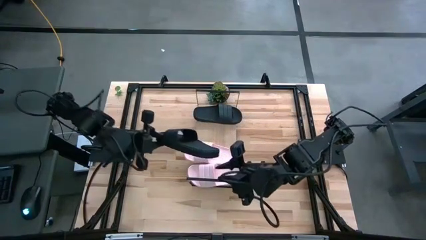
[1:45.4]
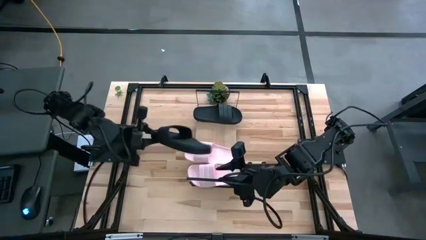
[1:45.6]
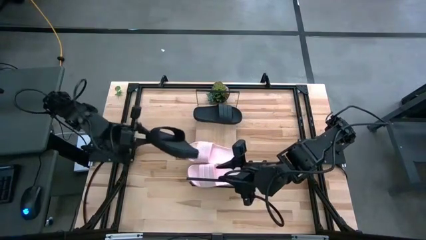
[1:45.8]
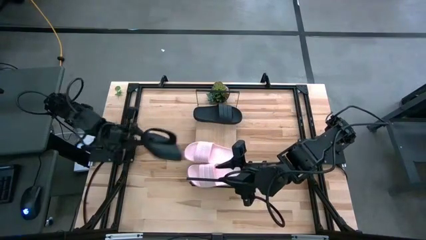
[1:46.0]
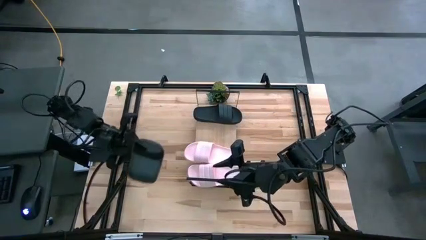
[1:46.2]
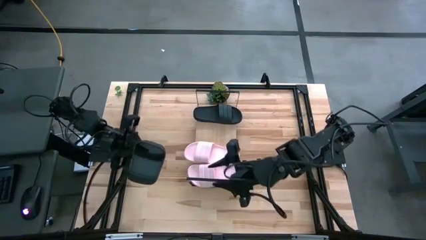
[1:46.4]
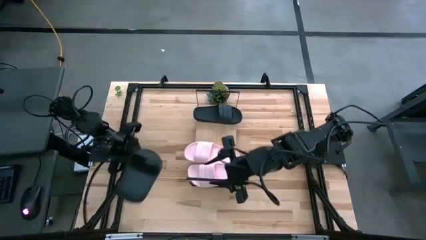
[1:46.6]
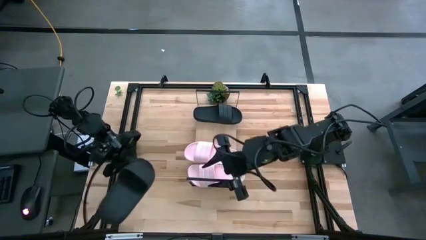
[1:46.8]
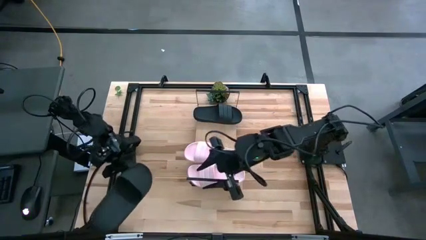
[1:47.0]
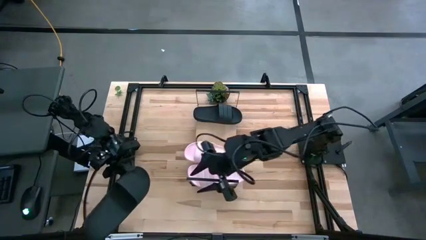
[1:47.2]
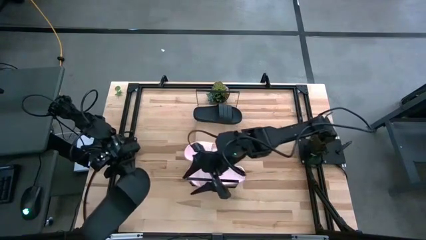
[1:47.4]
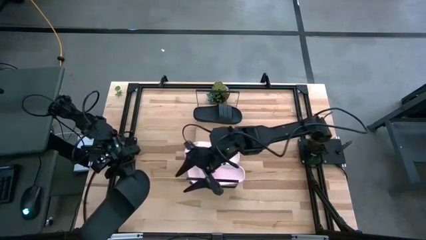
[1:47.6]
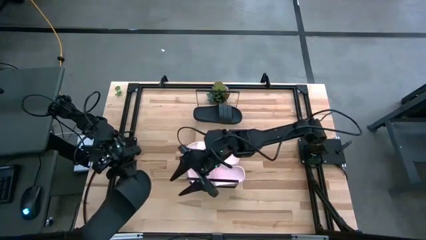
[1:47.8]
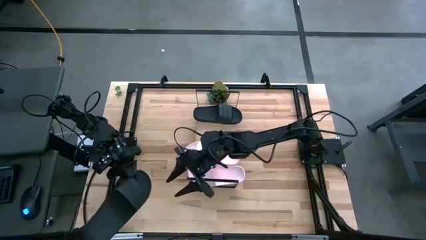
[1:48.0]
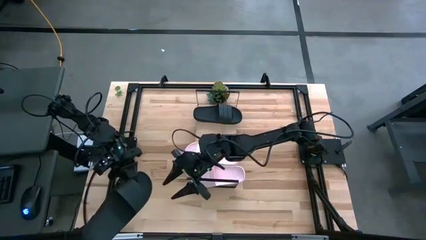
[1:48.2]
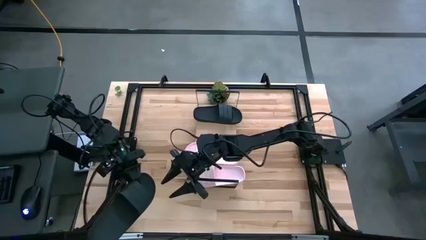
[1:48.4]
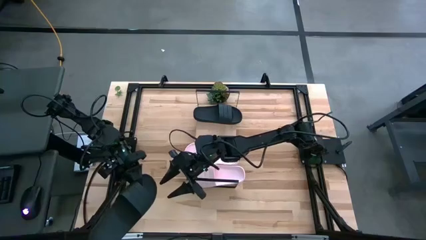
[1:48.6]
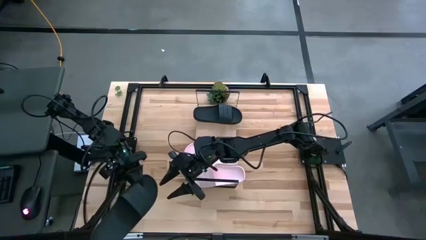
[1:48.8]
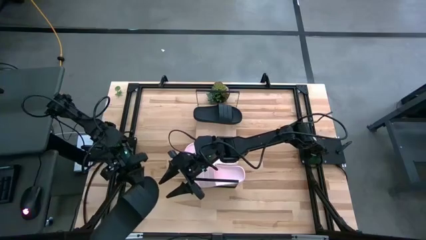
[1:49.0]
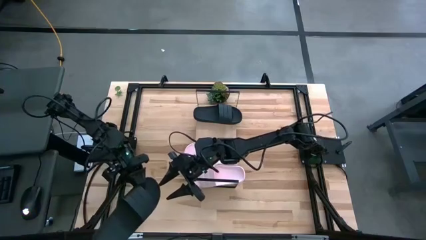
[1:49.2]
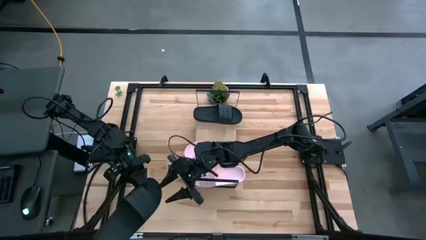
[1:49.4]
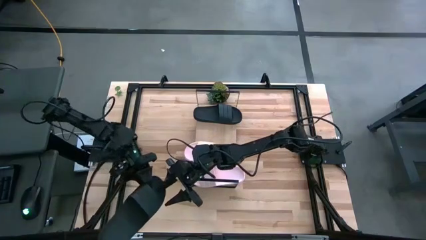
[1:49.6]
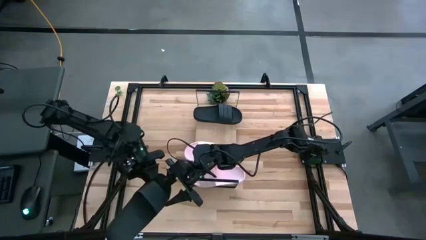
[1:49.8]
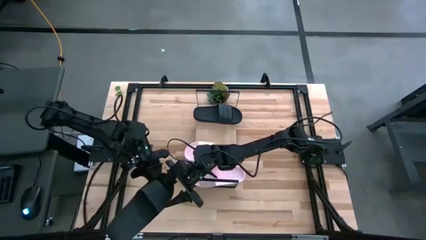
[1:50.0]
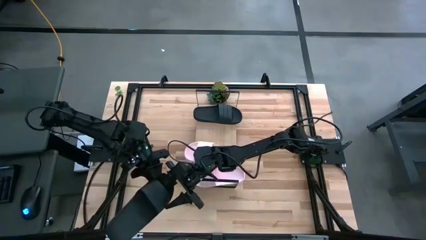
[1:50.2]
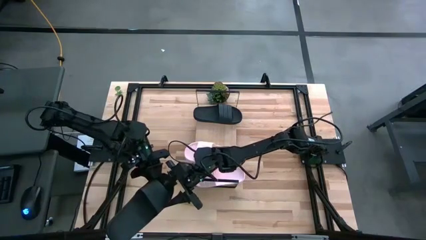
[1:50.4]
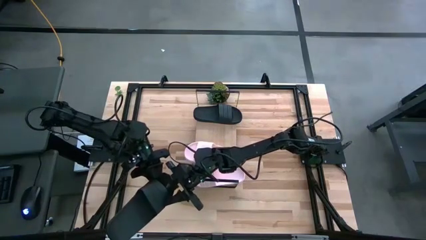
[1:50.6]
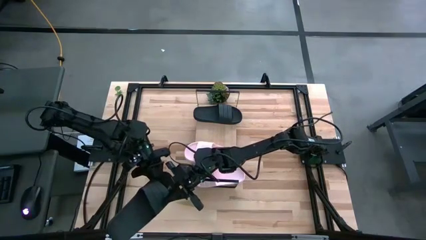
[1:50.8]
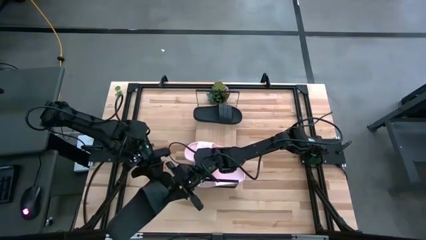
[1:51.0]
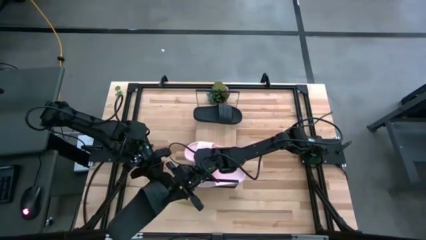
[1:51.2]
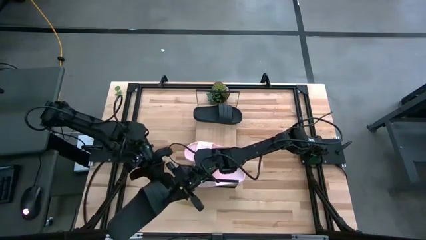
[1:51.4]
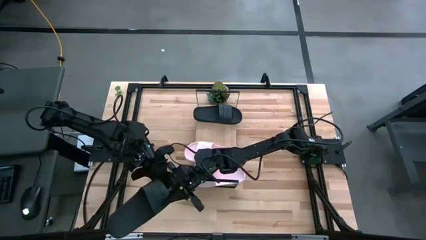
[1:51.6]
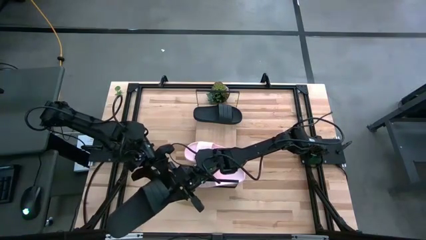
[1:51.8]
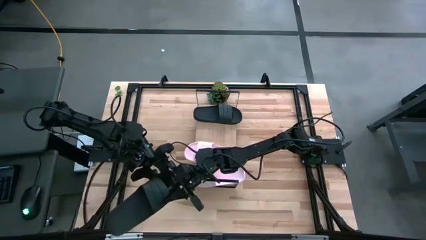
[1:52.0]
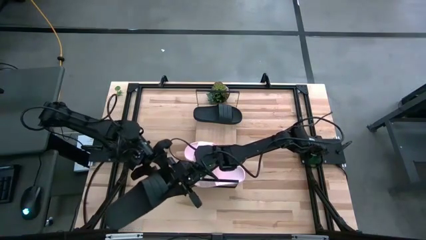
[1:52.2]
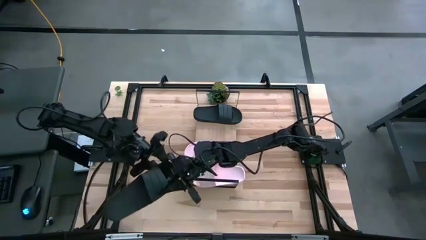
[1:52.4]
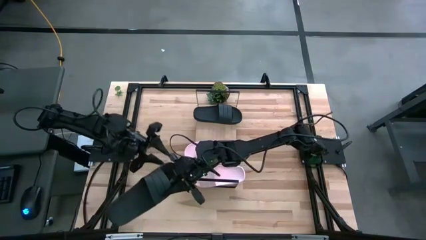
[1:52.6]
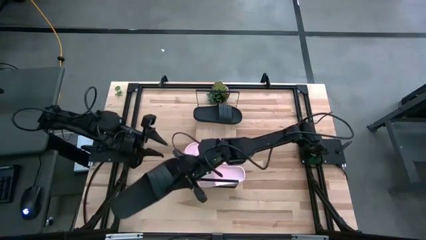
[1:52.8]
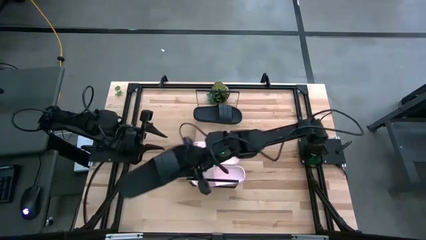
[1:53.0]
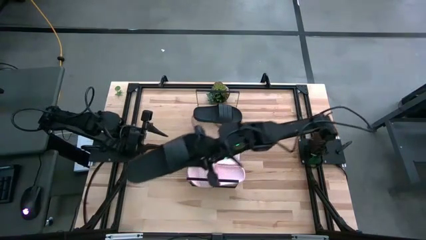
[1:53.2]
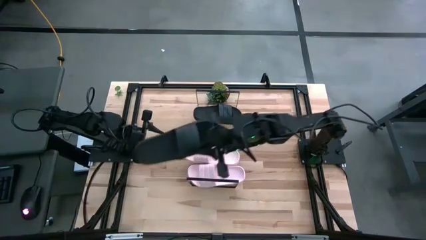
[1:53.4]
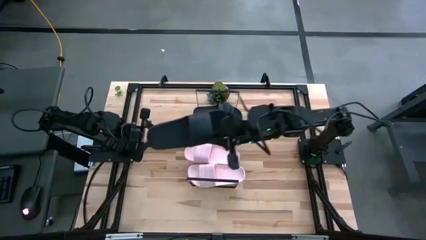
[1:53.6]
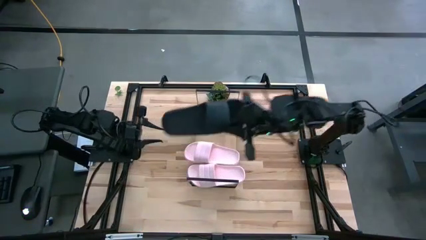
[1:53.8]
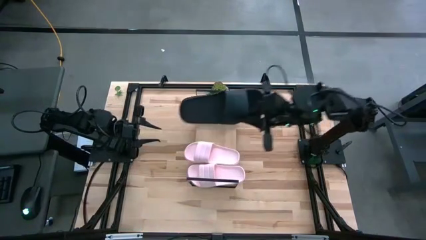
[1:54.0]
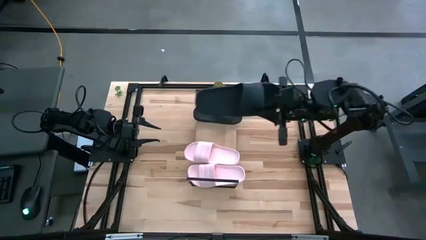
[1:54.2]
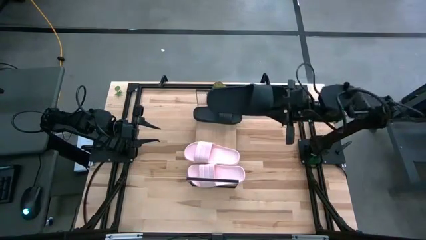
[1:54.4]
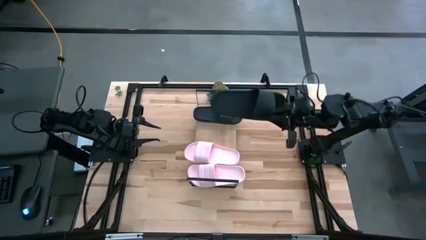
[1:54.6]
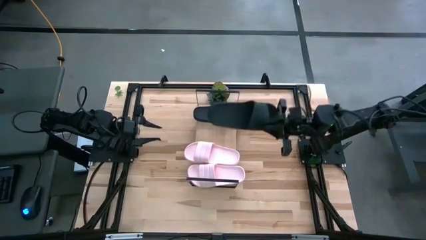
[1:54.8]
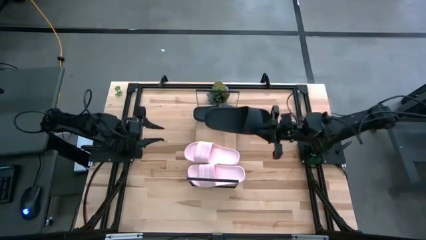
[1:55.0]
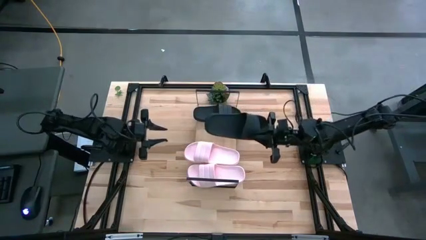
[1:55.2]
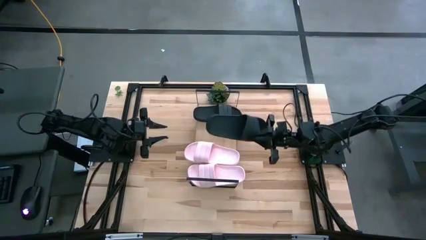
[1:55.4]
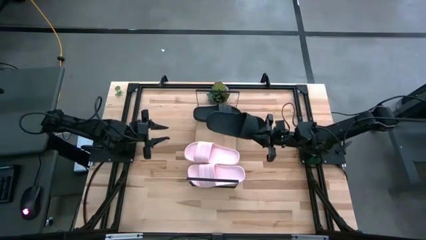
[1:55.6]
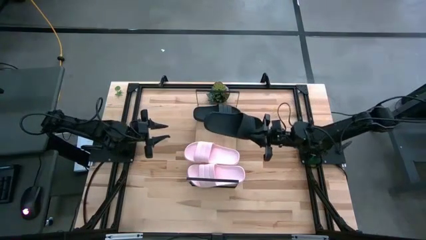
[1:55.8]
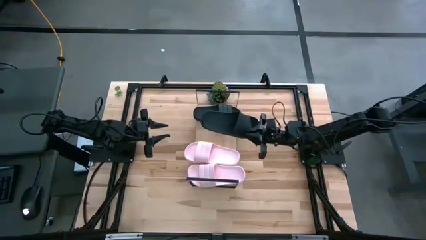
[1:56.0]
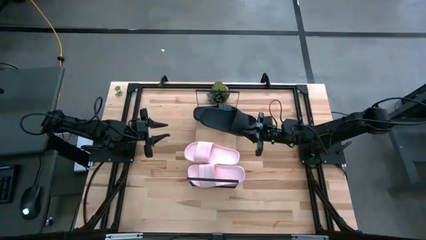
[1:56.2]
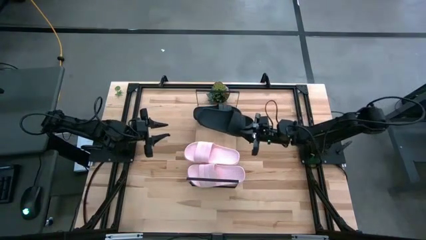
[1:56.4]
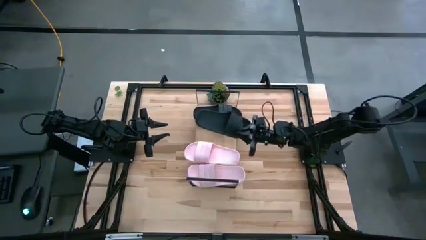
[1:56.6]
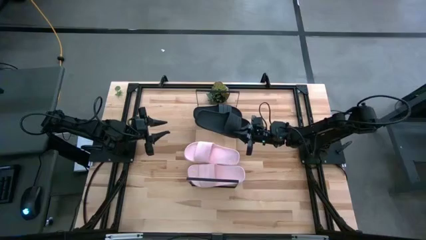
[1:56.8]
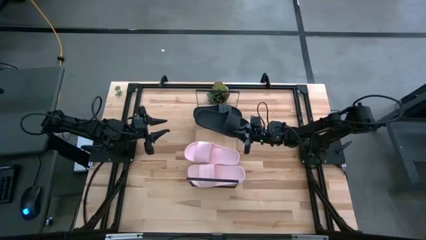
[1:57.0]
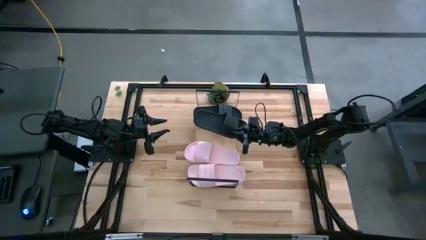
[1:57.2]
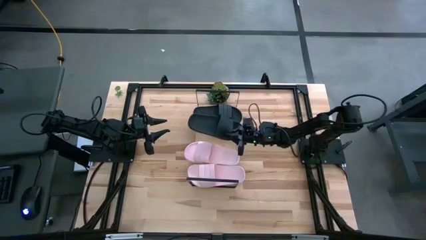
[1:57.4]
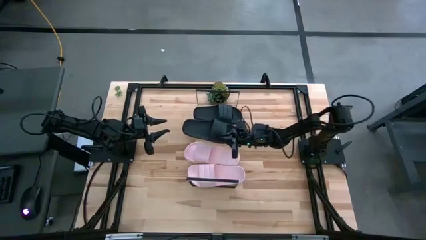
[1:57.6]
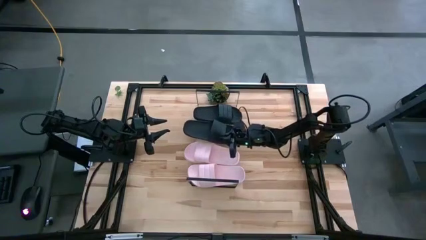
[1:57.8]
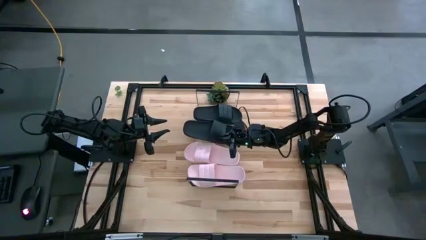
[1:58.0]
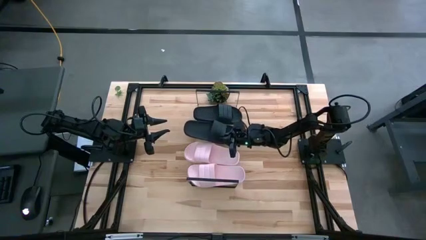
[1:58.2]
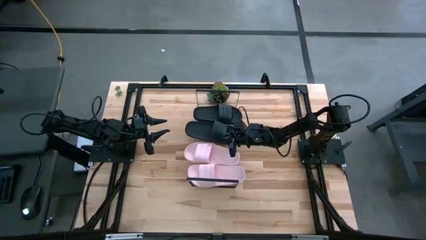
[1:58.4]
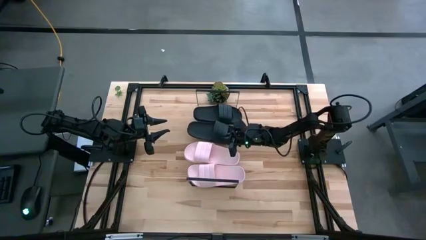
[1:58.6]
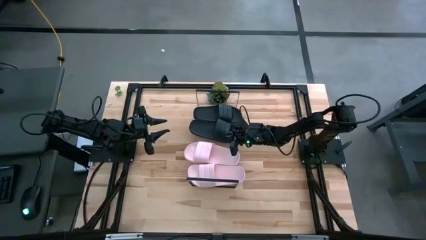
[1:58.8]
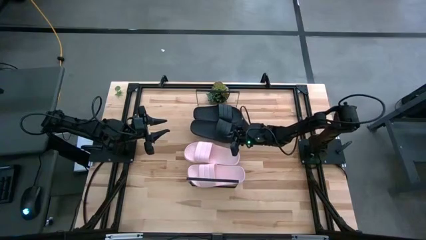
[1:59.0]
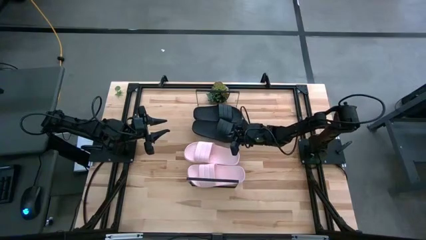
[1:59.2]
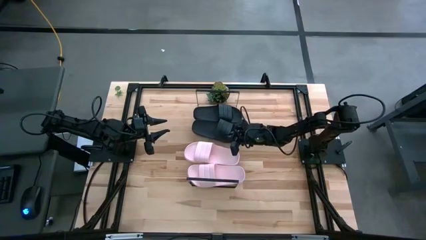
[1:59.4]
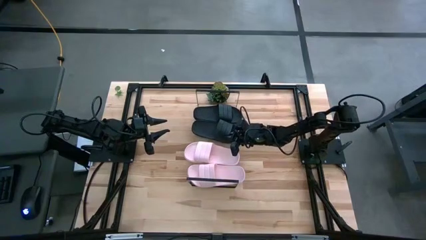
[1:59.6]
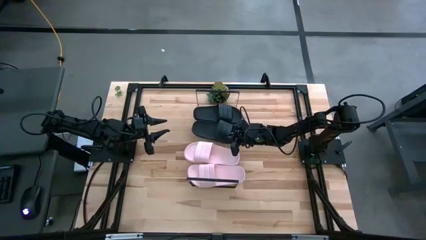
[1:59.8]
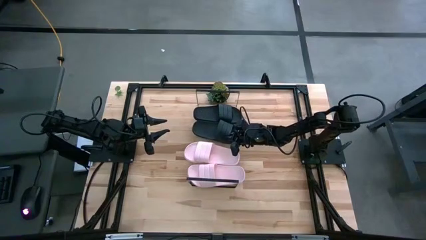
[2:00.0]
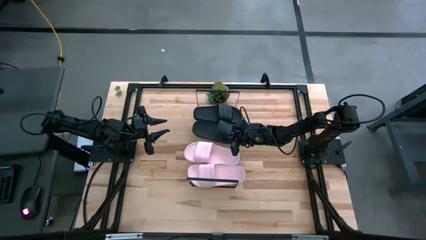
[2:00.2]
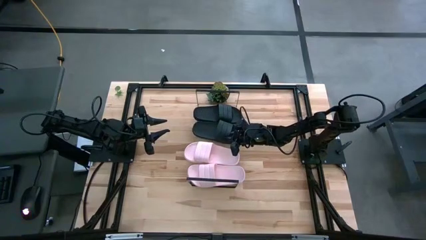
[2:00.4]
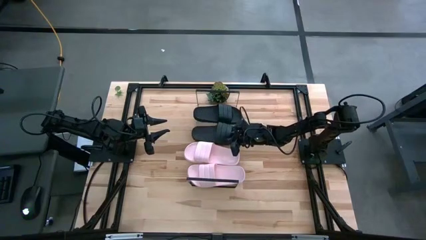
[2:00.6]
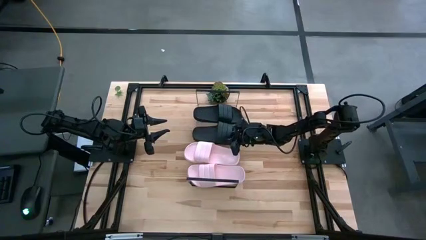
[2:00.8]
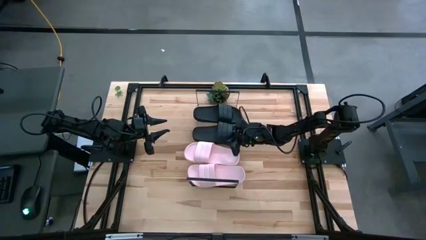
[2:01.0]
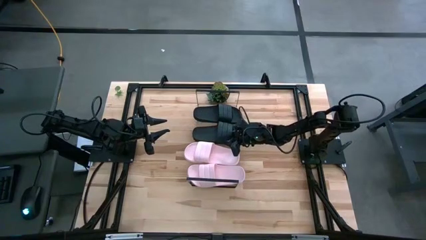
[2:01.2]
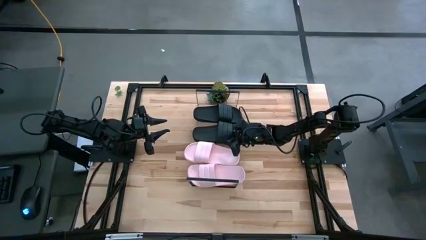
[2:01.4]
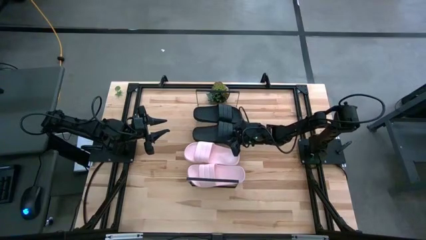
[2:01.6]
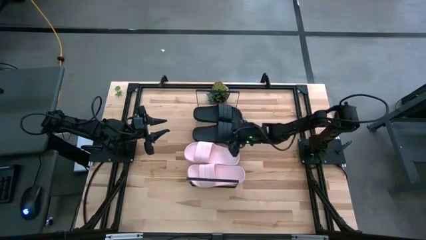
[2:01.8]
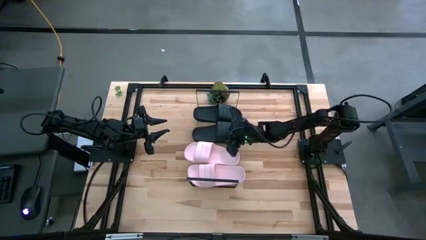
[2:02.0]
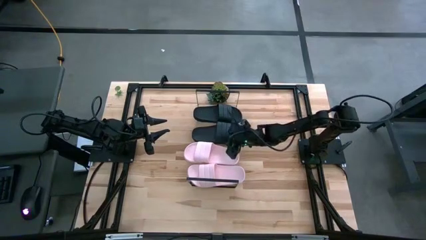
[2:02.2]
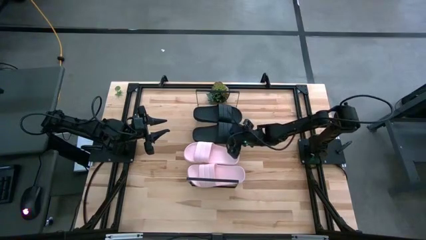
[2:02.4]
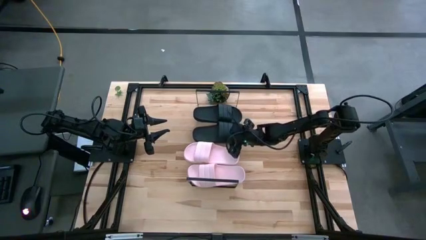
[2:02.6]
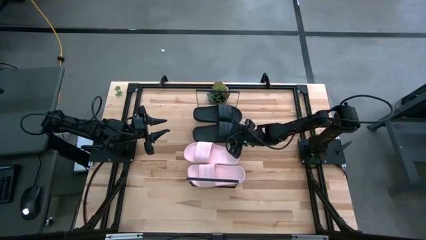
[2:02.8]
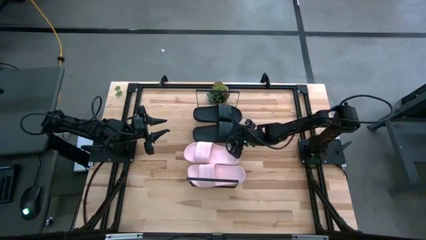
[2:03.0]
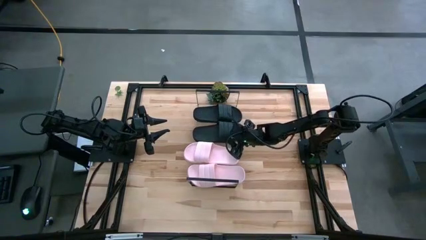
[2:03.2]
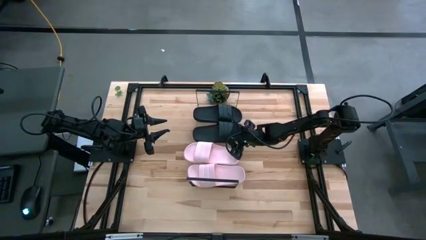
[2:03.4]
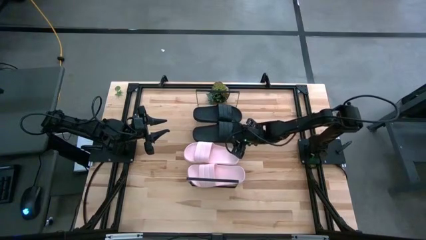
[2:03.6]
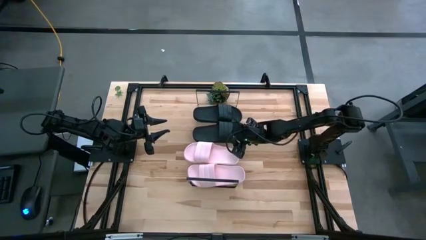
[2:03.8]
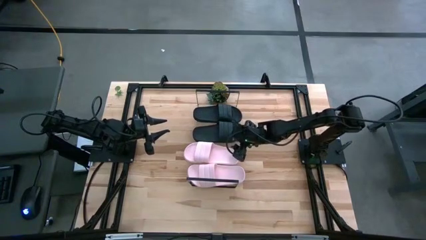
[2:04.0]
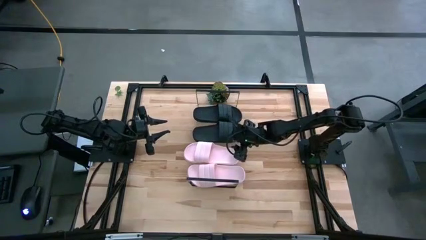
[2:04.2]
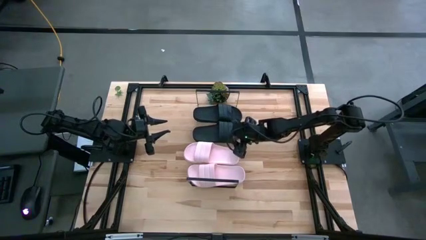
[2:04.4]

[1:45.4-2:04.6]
Task: Pick and place slides into the shelf
Put the black slide on the shelf
